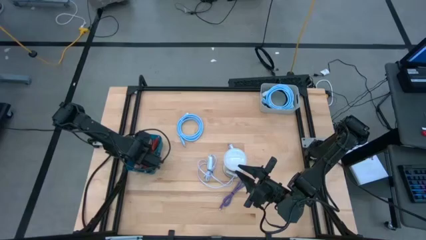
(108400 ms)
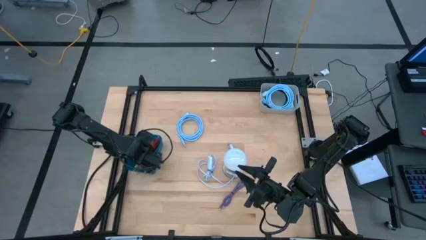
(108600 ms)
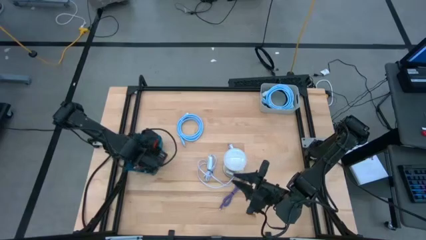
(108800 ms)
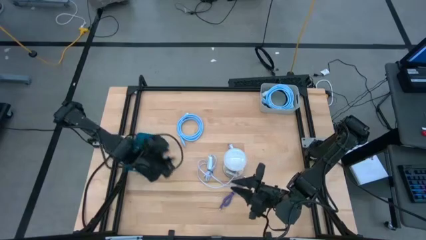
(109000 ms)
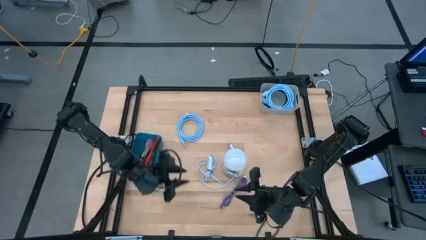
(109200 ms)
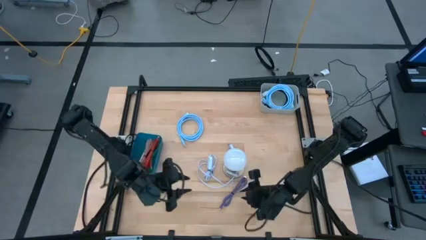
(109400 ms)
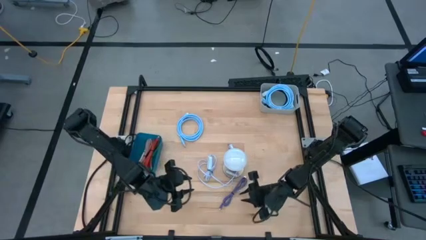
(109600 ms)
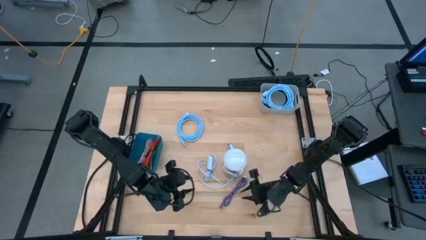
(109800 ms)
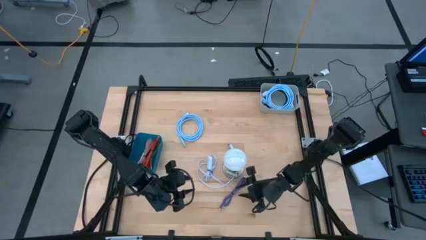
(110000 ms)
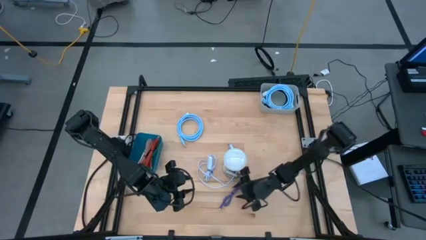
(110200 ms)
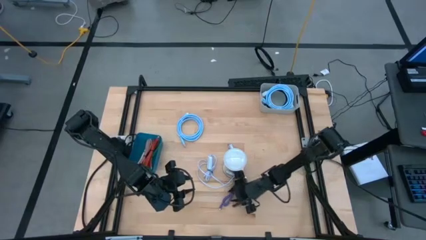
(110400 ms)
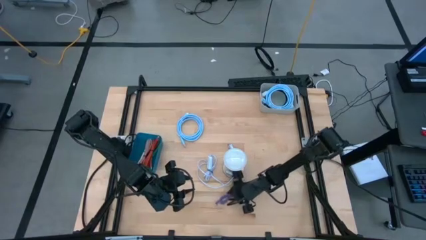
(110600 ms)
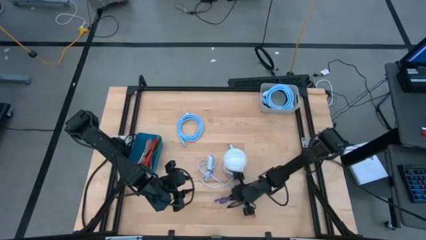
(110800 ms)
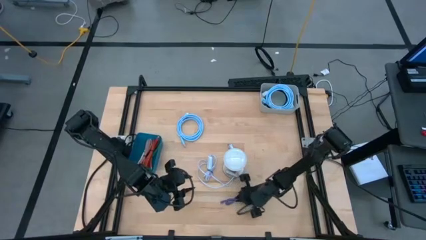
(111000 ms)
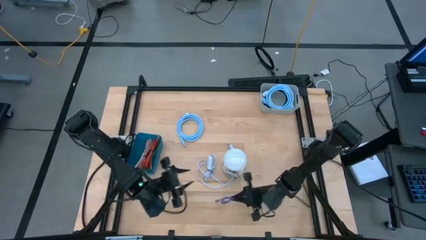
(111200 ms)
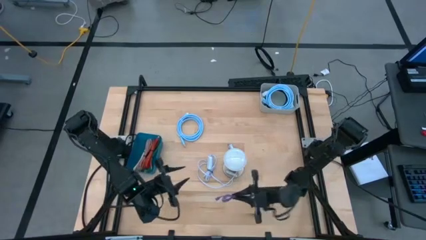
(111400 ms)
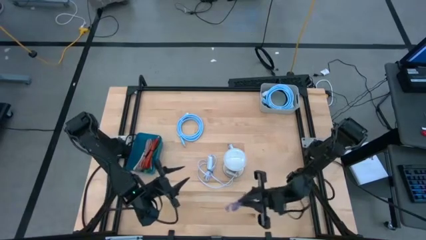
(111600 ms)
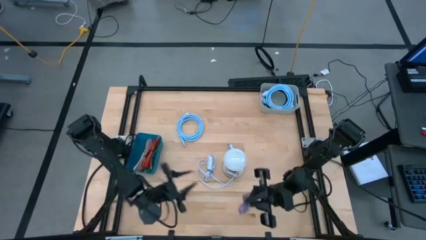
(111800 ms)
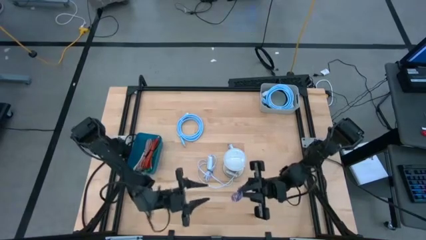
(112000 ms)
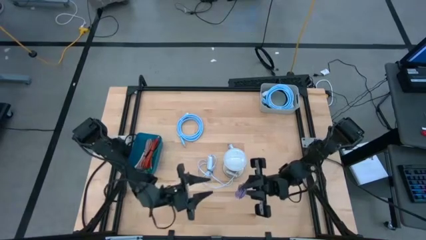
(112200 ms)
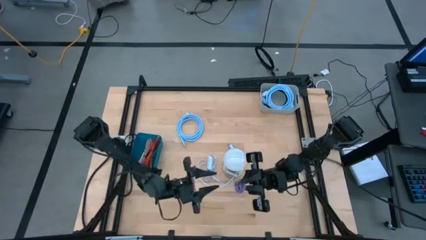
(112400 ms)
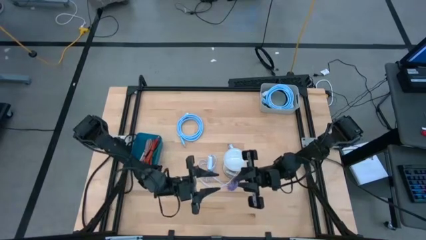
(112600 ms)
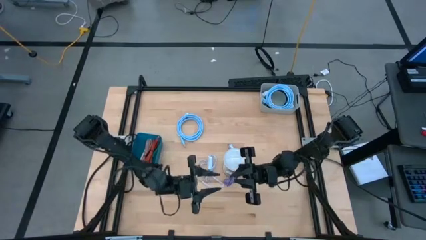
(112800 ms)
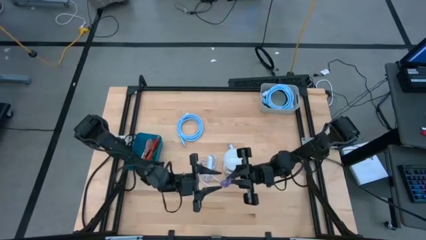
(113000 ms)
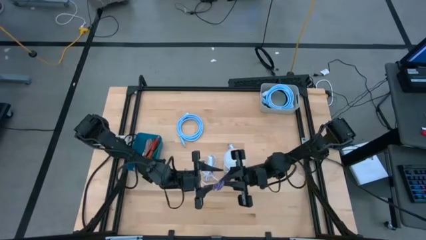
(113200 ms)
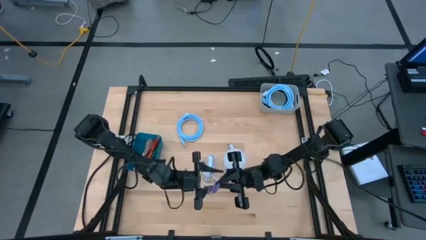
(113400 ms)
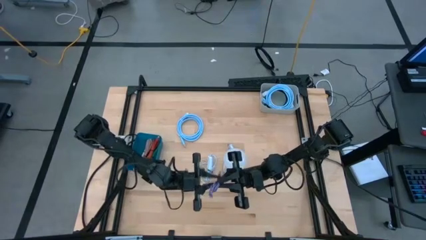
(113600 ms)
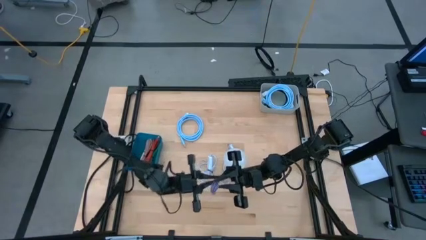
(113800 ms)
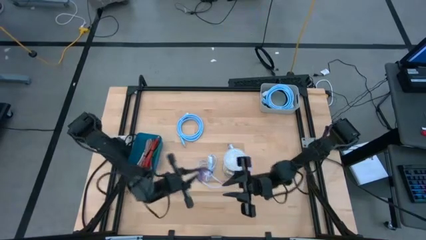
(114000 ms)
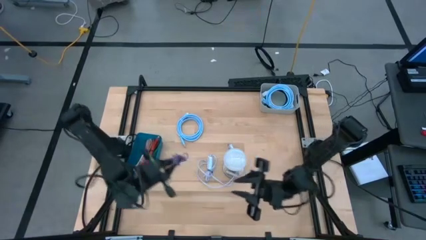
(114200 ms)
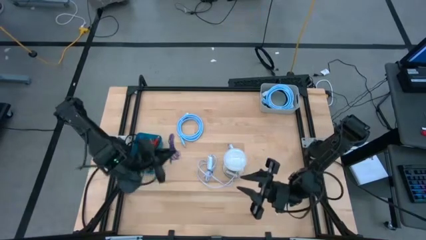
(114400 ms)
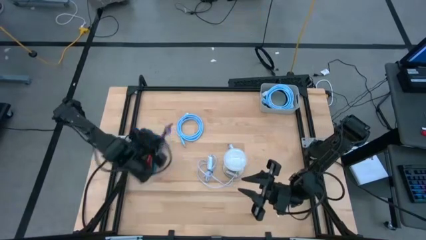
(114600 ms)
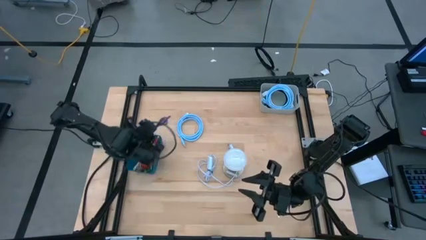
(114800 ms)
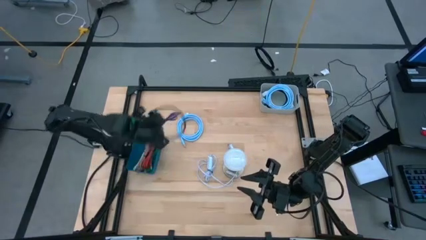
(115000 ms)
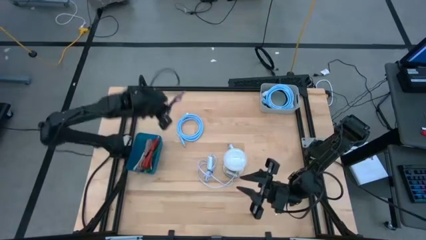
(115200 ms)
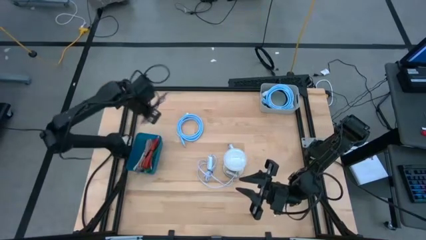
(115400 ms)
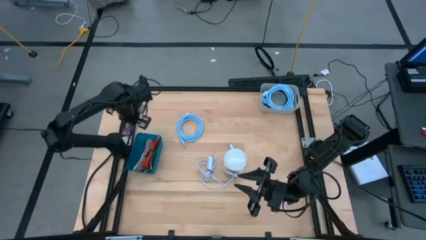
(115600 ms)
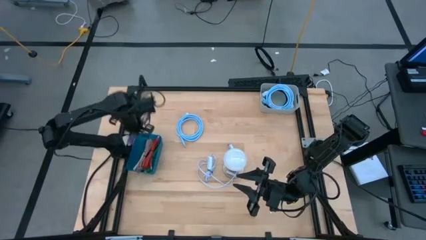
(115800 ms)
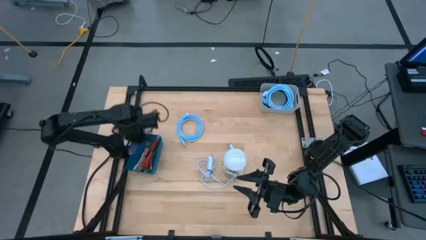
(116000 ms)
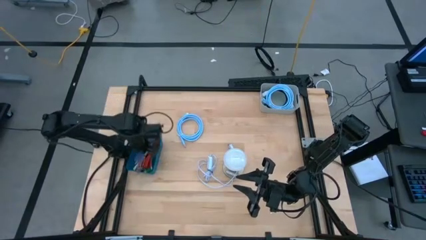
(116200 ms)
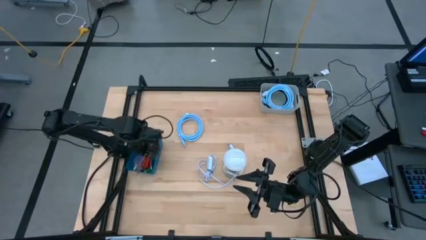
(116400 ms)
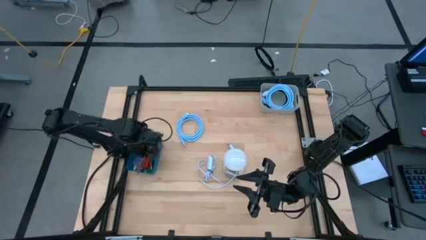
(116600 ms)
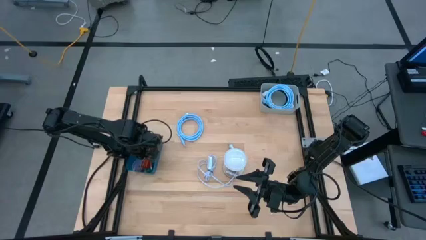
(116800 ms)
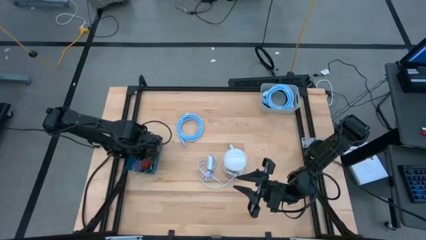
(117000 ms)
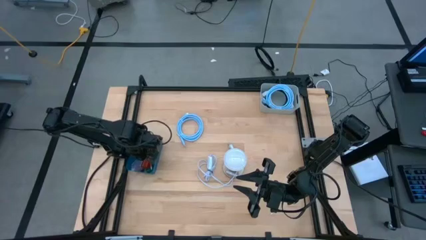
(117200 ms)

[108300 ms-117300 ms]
Task: Pick & Place USB Port
Put the violet charger cable into the blue bin

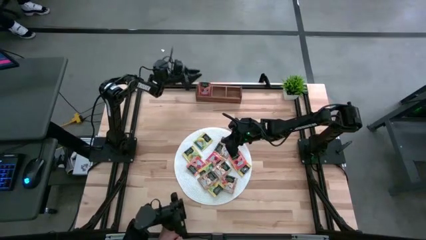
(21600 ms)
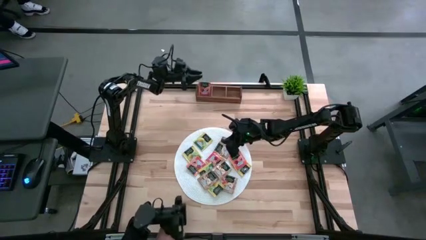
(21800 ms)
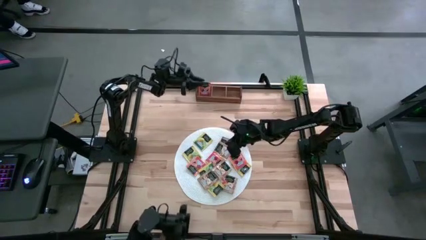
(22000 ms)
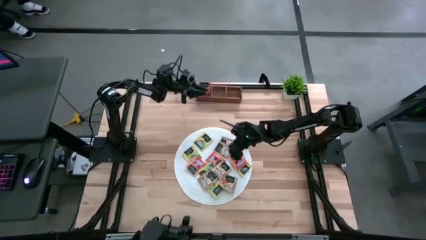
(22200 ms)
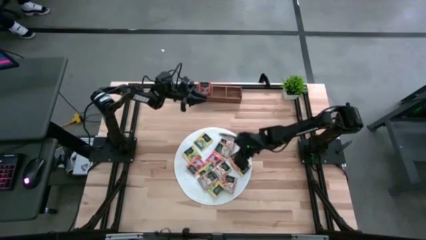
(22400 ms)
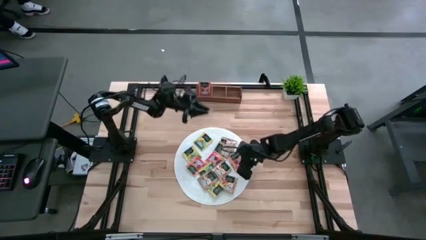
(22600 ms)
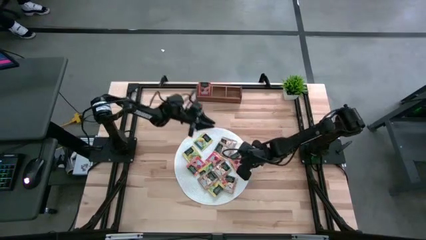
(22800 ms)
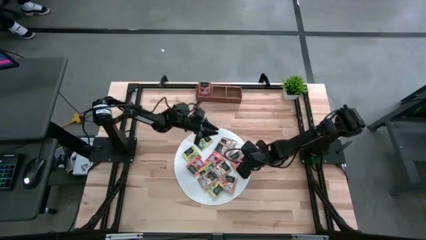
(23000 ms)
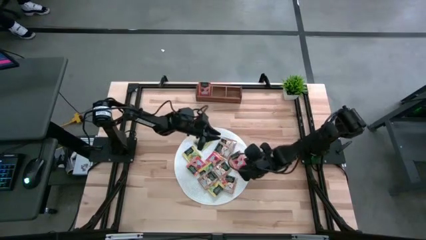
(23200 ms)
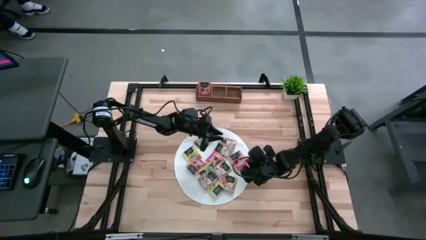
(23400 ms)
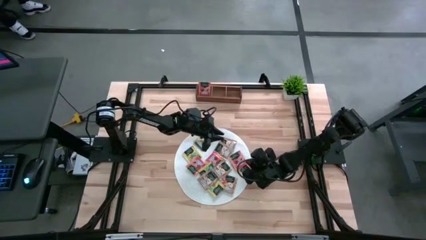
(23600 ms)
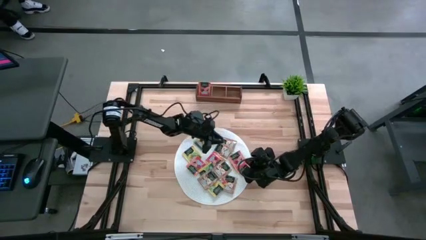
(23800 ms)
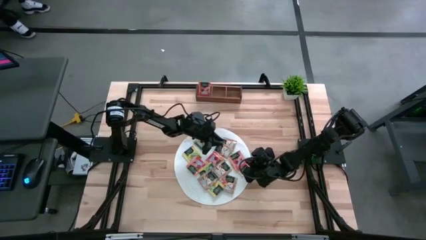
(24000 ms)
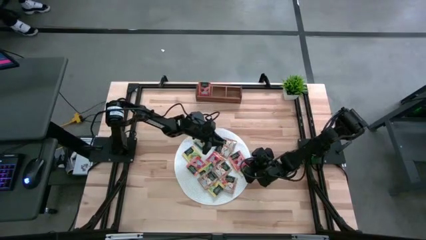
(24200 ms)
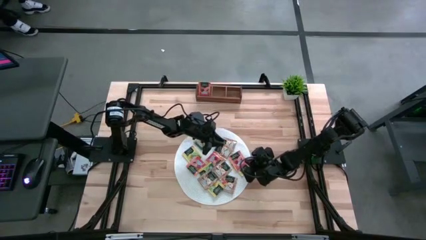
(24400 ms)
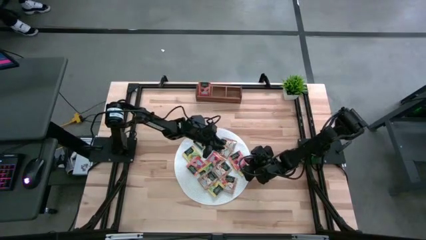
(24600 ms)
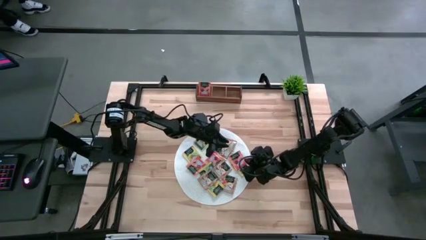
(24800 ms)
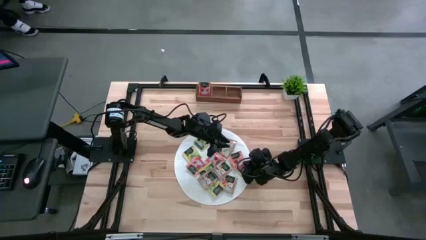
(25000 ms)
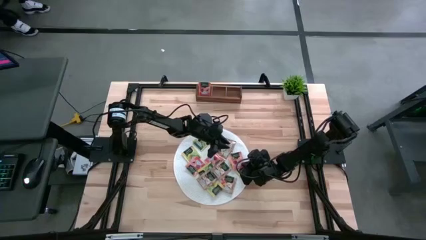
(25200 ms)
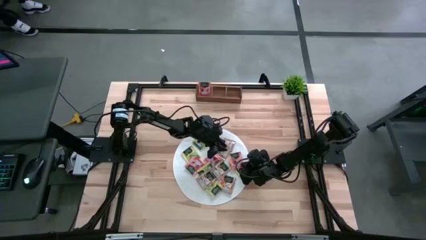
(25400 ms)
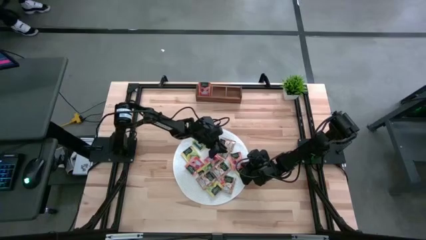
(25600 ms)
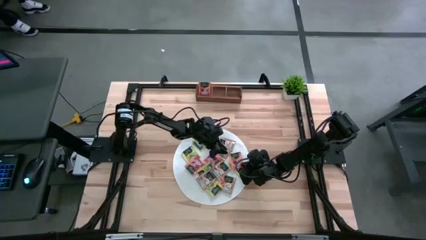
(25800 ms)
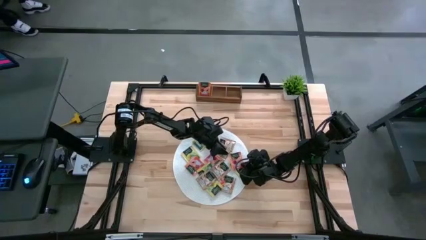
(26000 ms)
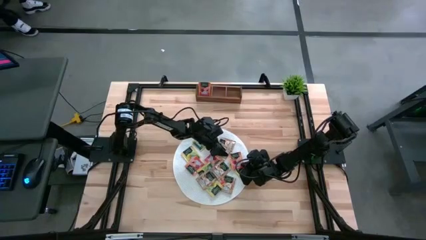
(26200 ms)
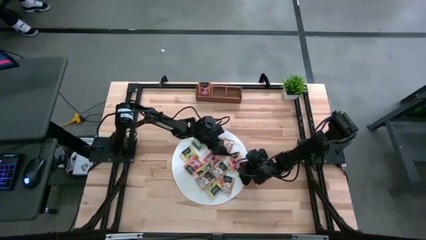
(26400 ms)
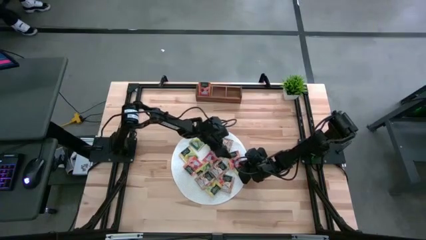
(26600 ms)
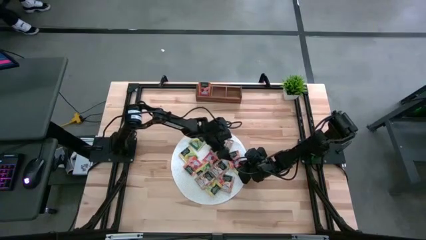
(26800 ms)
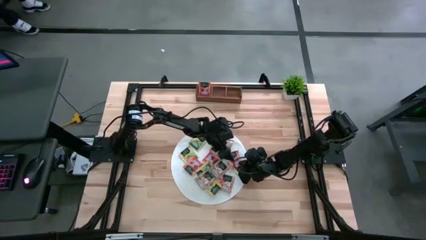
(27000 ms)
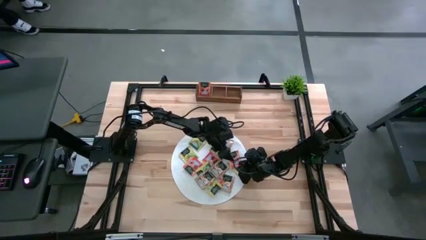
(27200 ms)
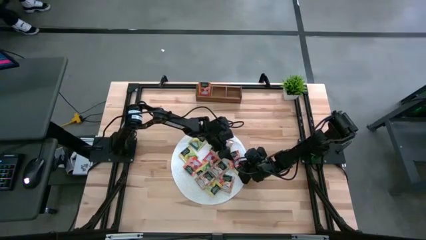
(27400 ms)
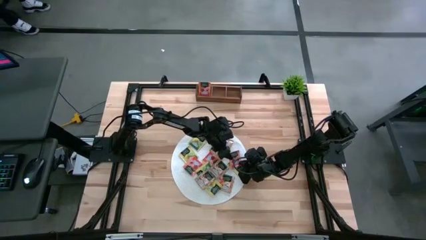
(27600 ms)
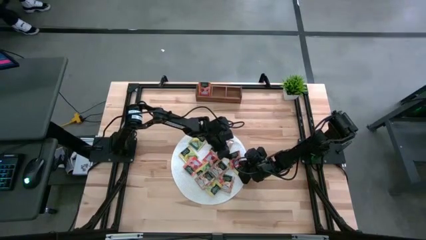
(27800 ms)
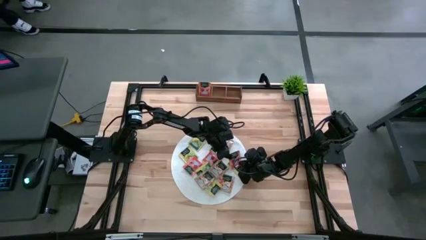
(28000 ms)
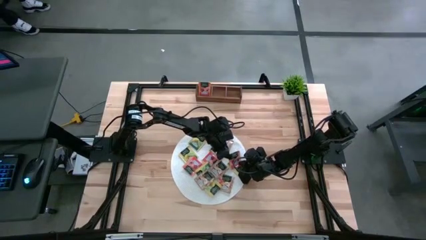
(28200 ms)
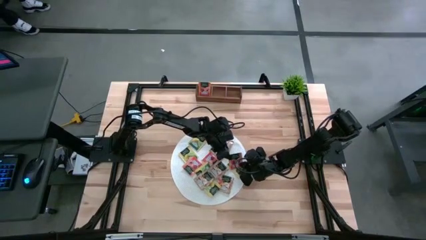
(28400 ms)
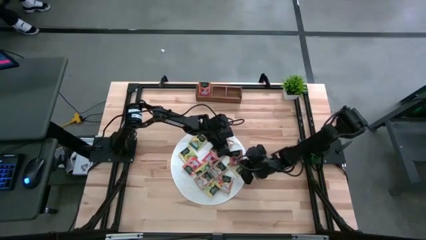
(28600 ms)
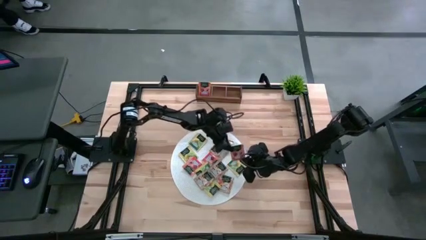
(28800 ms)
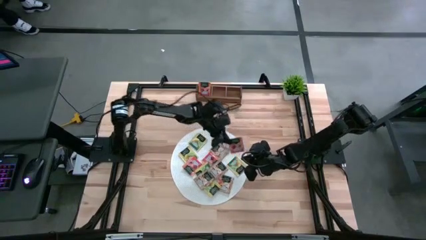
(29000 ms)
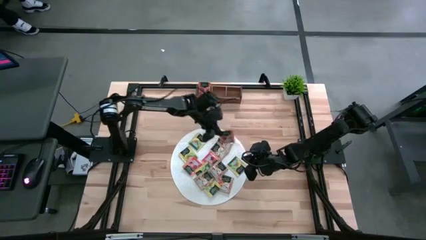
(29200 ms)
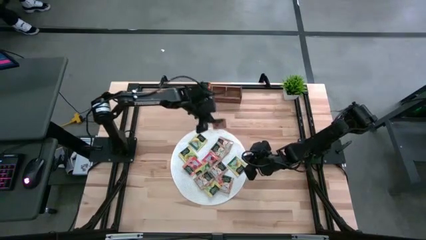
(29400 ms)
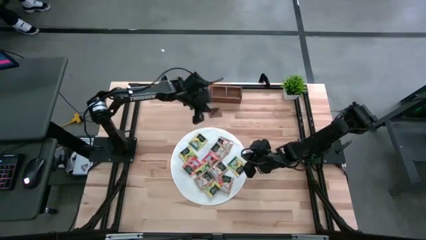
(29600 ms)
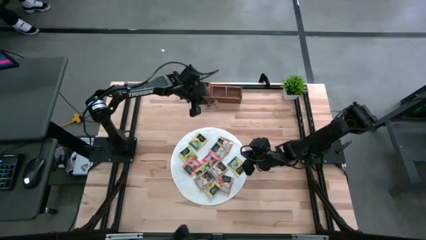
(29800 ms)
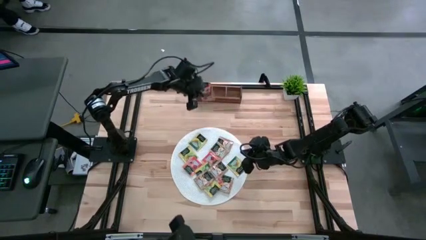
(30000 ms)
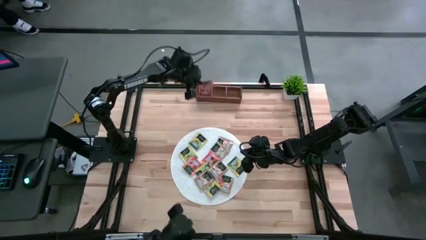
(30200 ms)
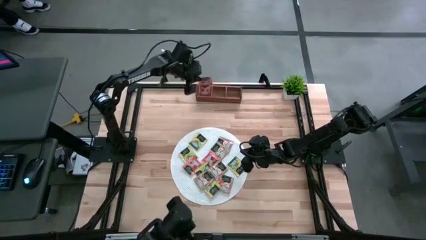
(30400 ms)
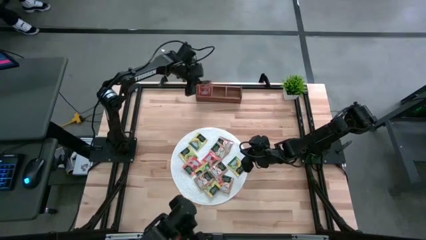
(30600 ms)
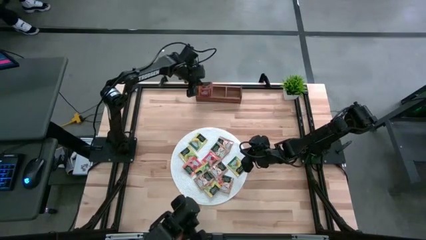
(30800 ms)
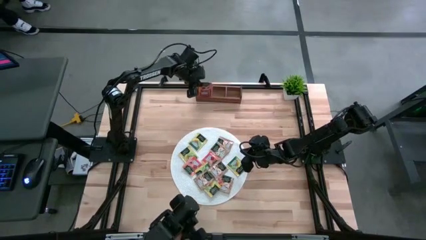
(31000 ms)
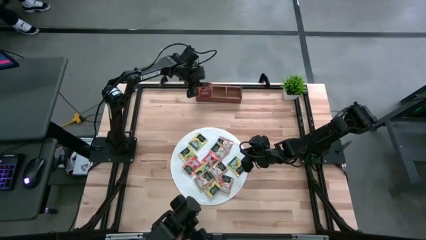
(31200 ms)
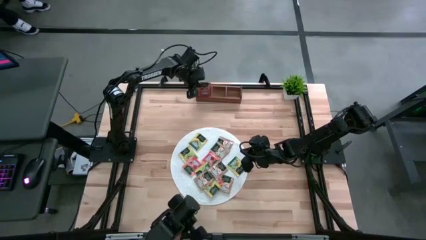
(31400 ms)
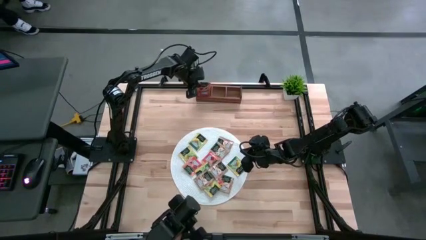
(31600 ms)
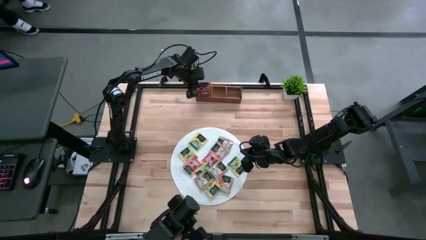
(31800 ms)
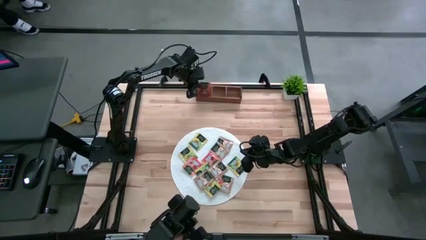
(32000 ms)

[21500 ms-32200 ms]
Task: Pick & Place Tea
Put the orange tea bag into the left section of the wooden organizer
